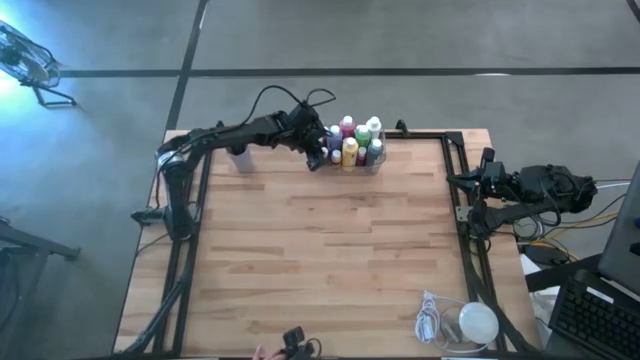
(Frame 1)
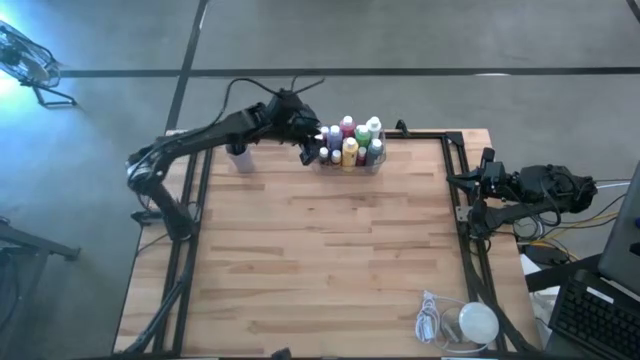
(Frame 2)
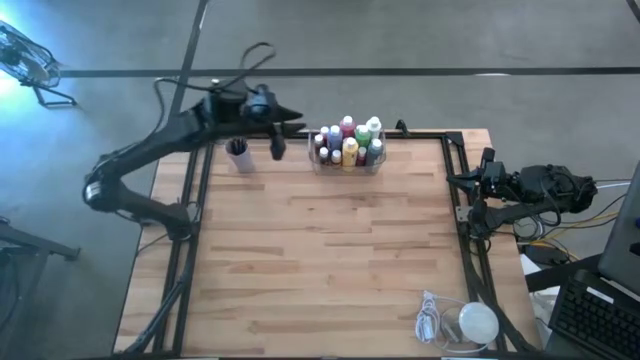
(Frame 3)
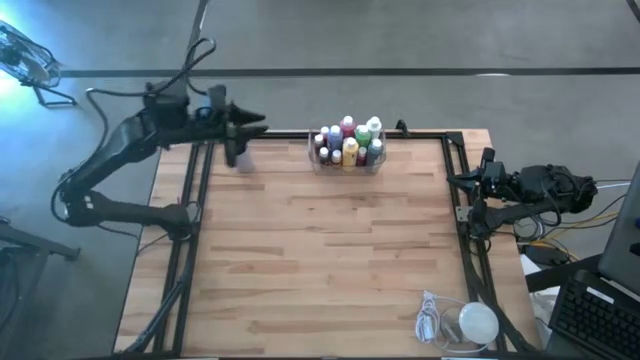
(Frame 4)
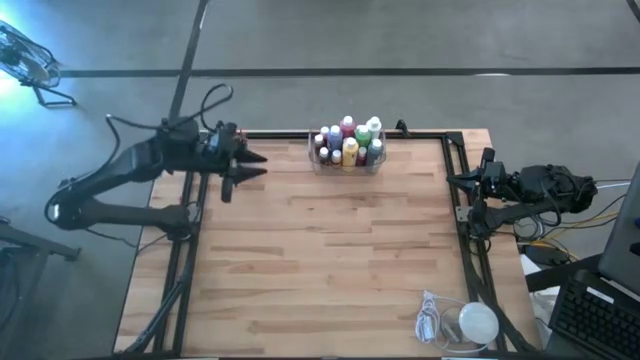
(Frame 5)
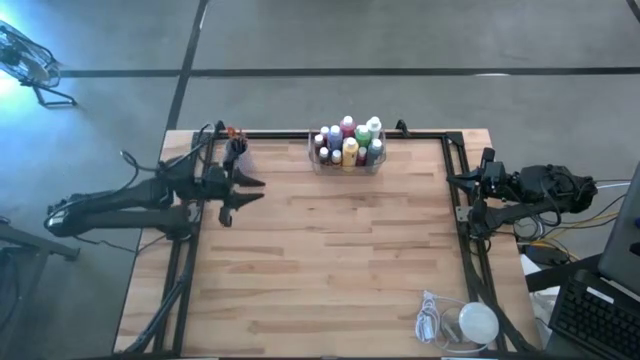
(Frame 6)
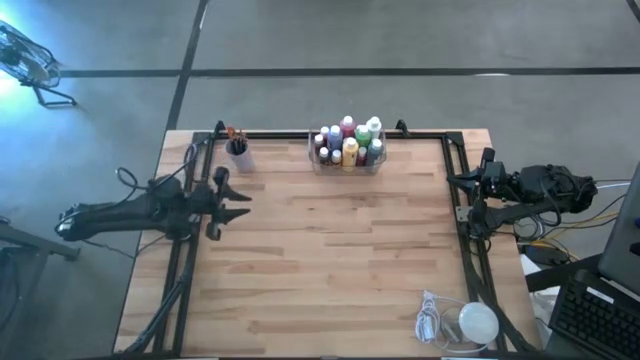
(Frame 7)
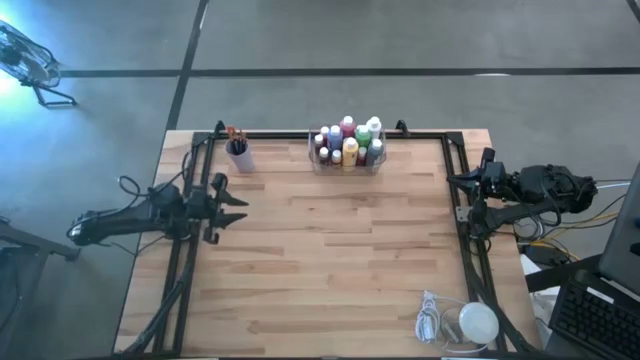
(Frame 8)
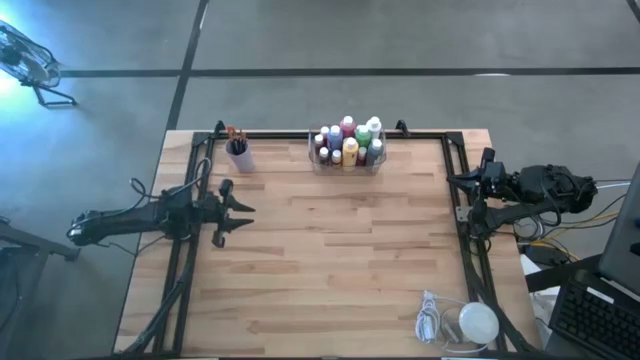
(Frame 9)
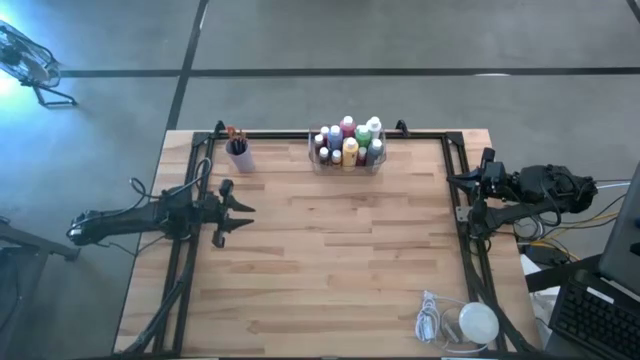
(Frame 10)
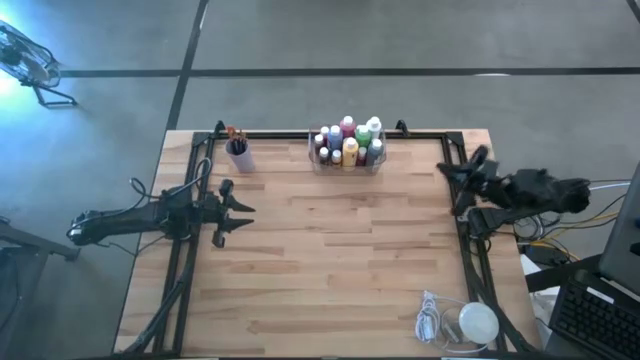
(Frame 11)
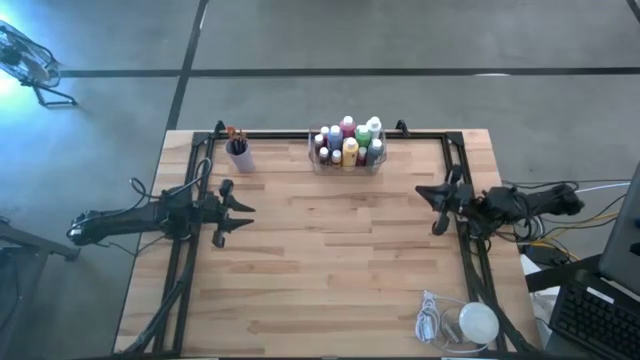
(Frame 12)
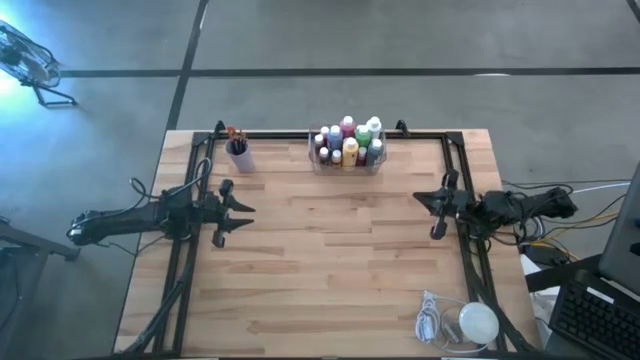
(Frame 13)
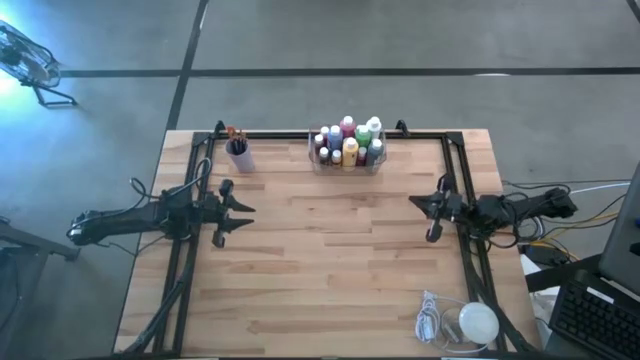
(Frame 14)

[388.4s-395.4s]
Task: Pick & Place Paint Supplies
Return to Home Position

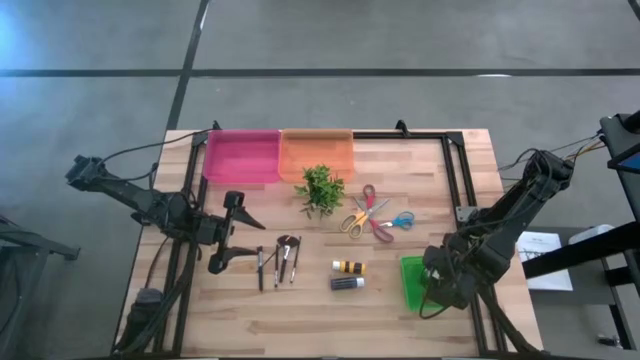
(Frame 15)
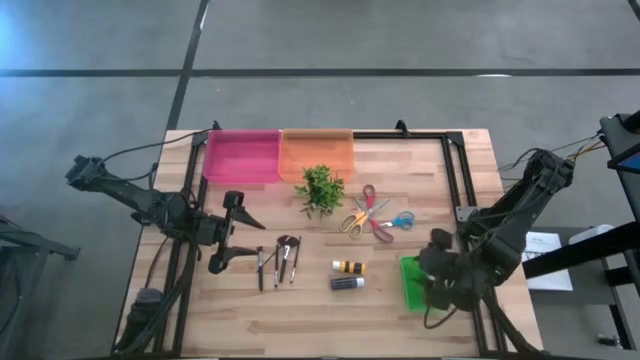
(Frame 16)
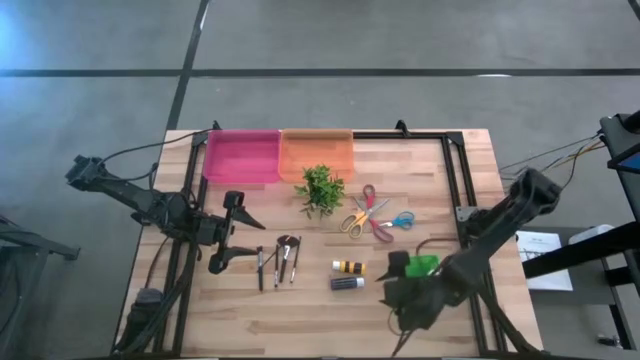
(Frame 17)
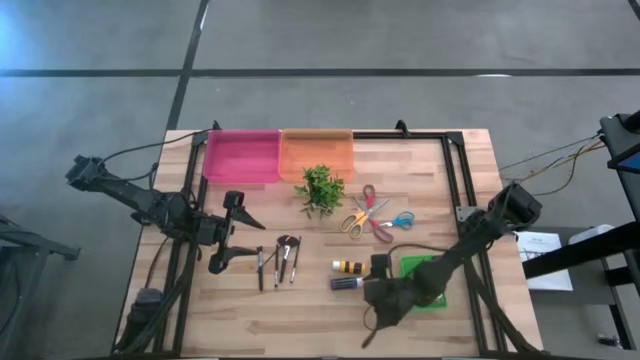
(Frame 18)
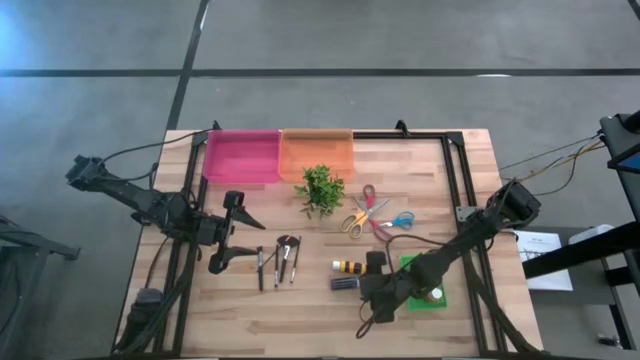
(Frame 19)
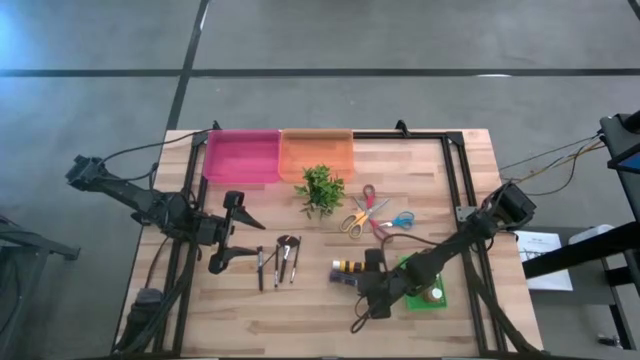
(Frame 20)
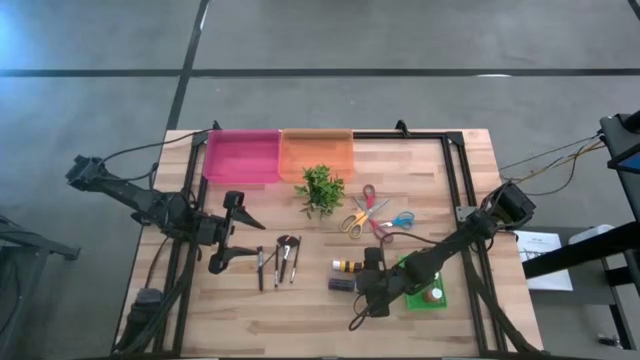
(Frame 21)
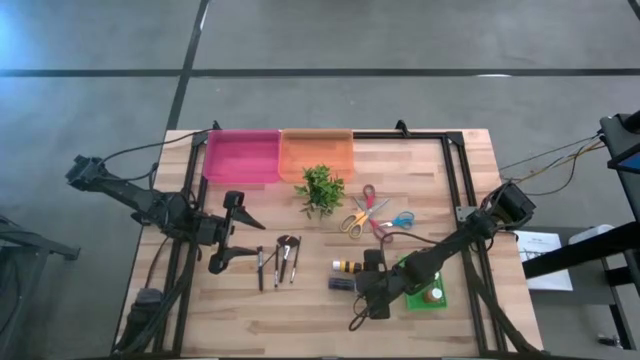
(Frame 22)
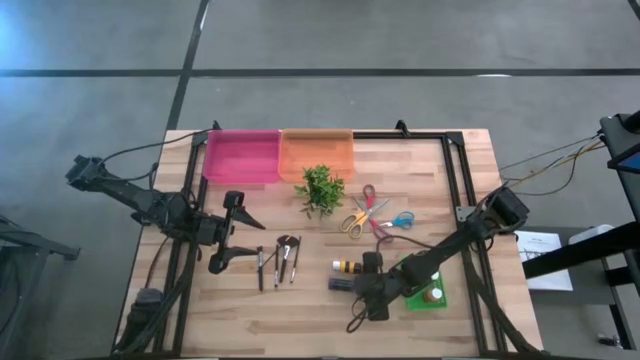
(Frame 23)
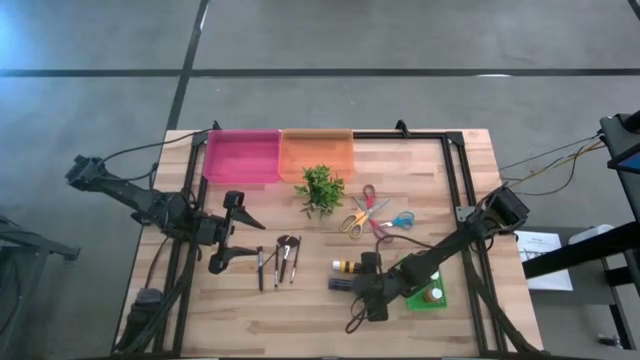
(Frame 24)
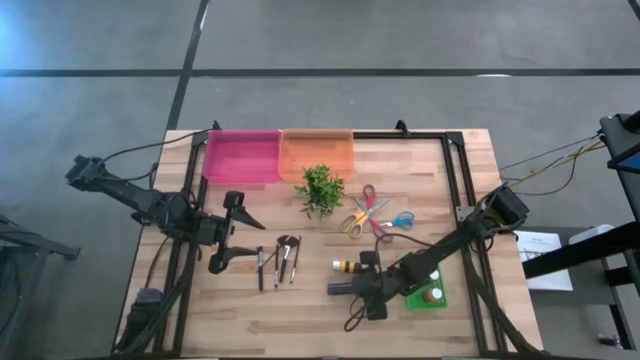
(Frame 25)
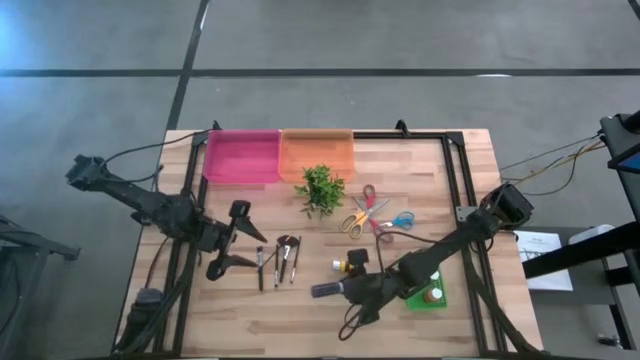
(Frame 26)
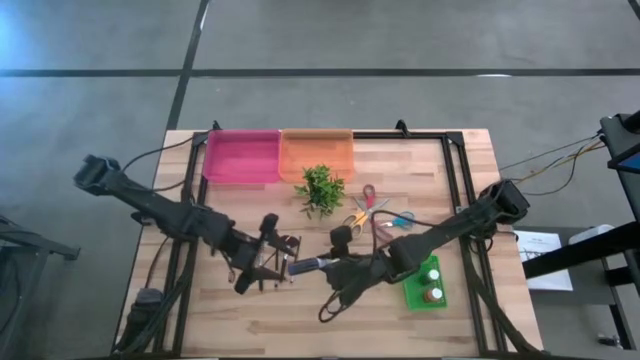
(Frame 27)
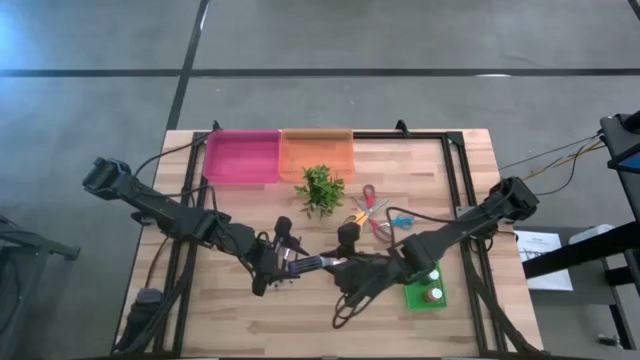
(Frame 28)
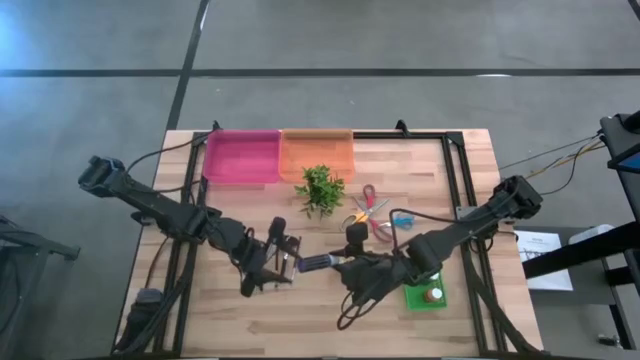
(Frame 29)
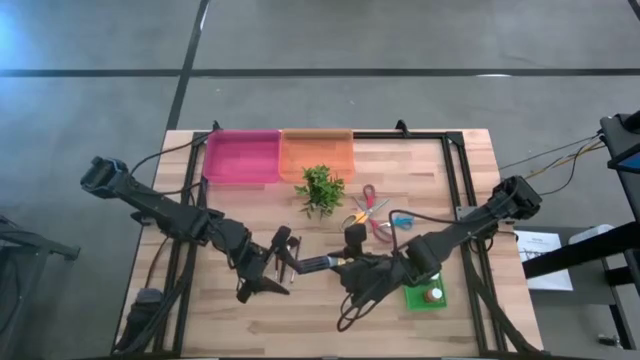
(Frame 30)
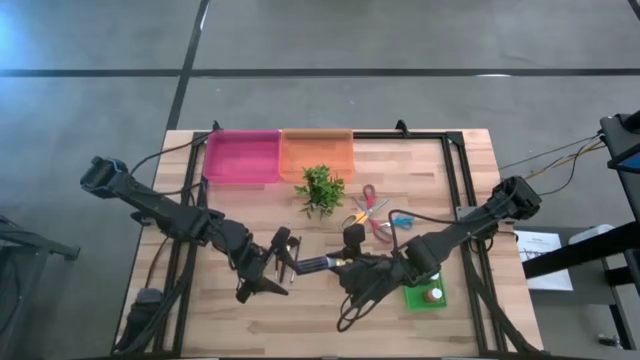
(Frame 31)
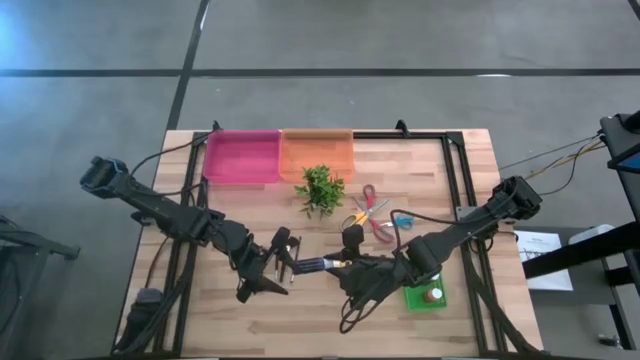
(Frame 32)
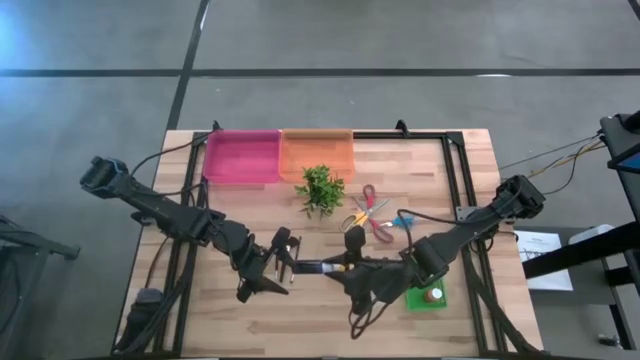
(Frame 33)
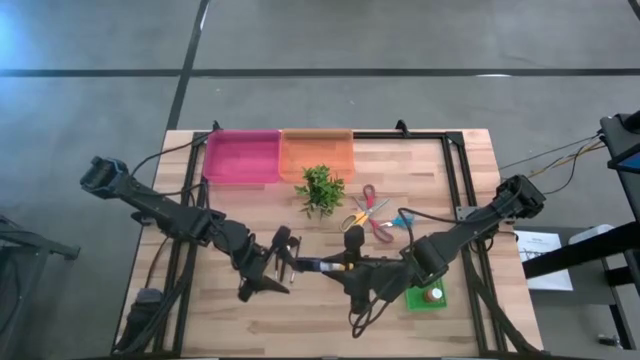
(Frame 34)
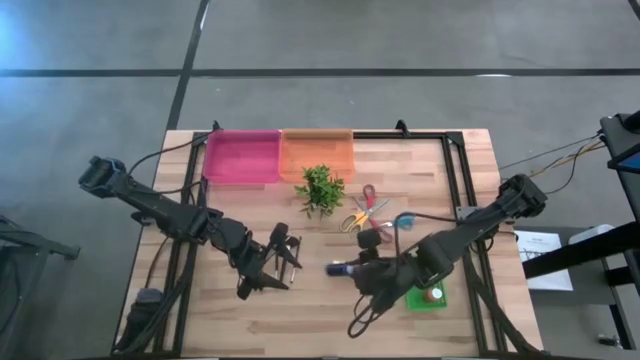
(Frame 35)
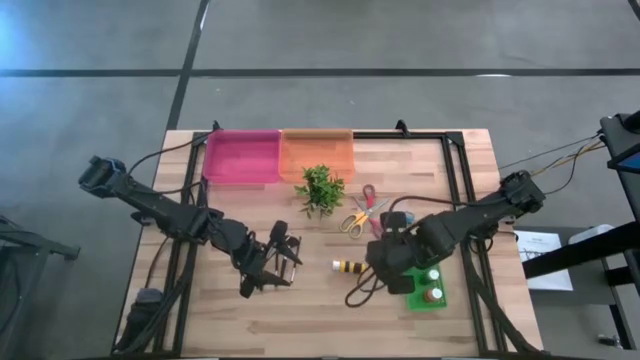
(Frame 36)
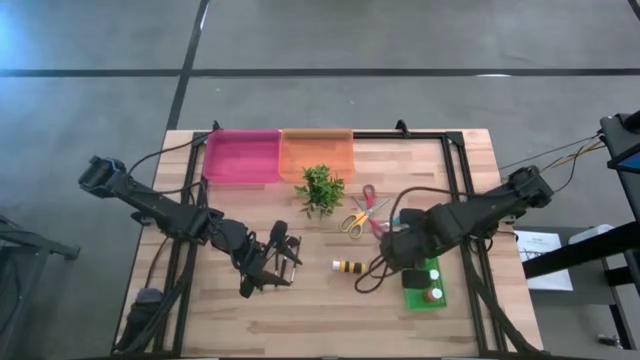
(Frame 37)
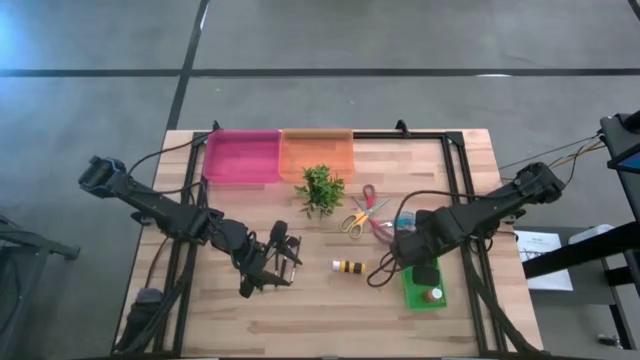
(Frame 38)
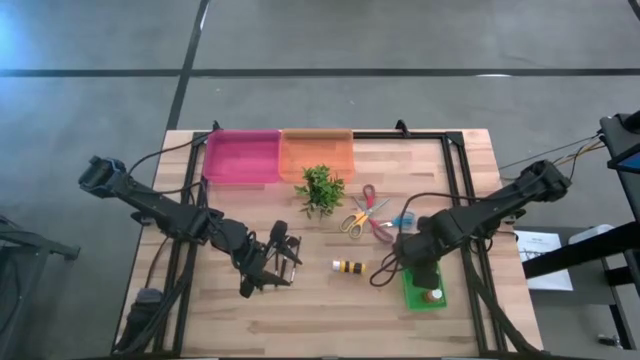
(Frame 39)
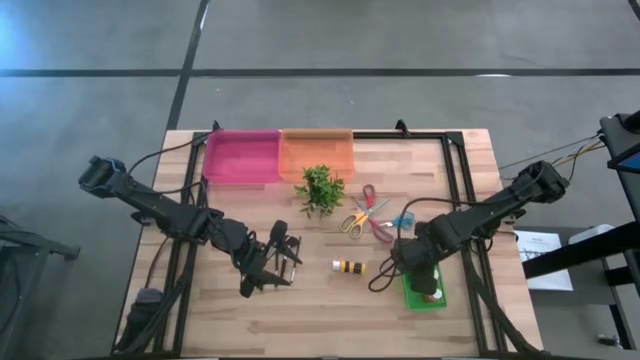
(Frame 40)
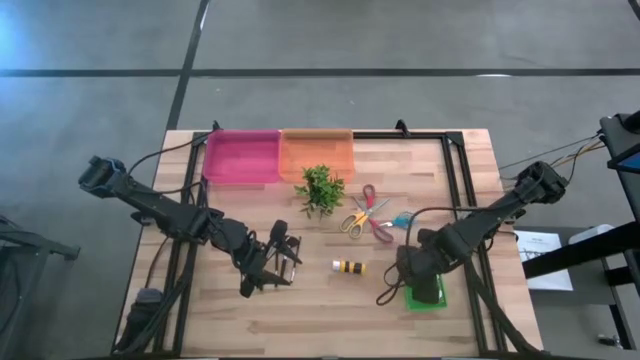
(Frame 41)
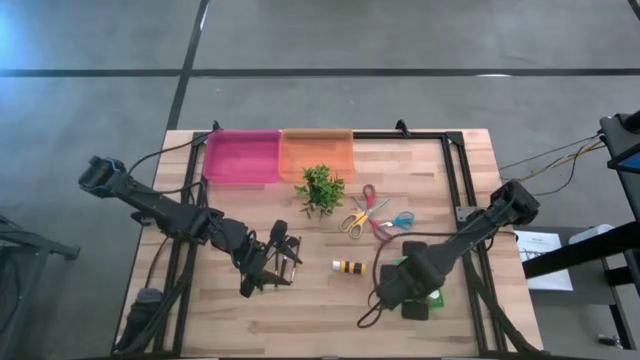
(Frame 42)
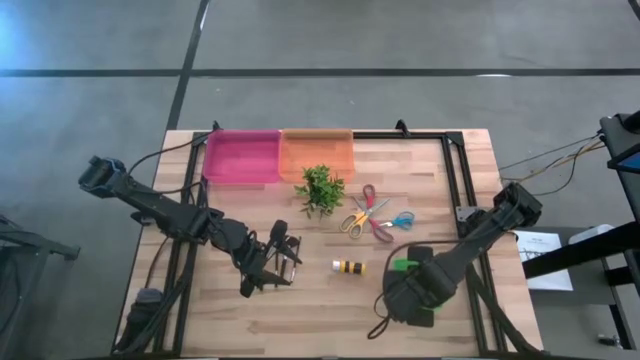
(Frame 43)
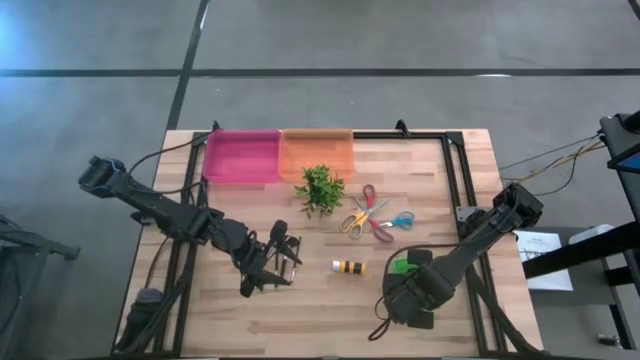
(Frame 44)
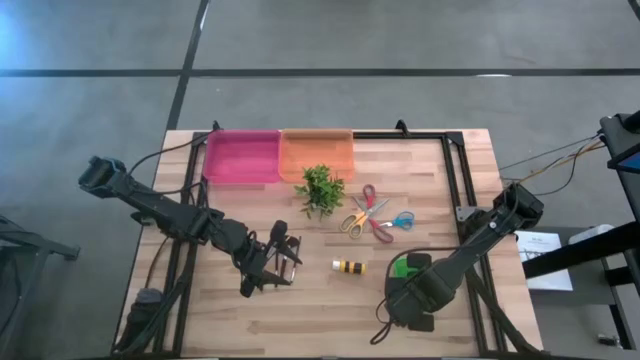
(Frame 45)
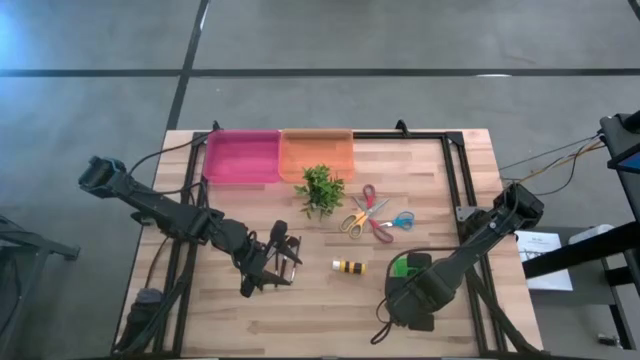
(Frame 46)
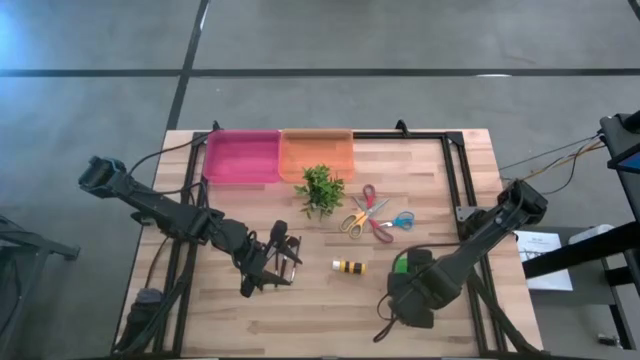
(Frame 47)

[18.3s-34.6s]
Task: Pick & Place Paint Supplies
Put the blue paint bottle into the green bin
